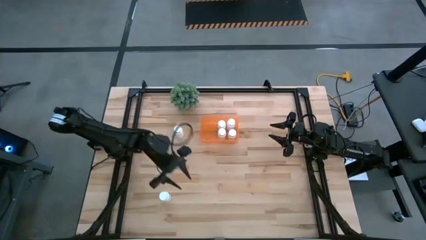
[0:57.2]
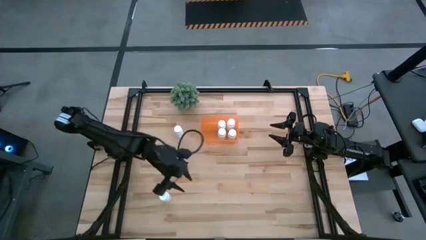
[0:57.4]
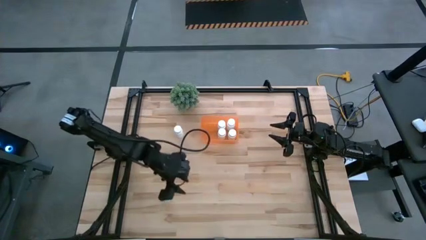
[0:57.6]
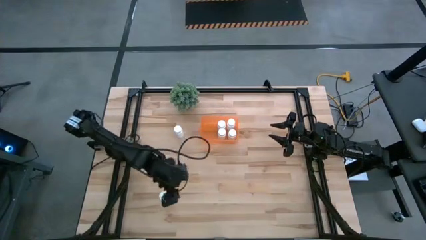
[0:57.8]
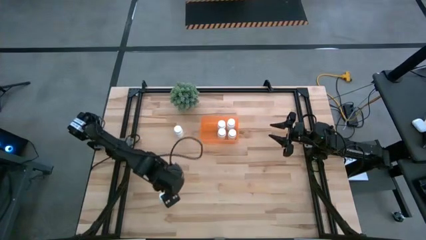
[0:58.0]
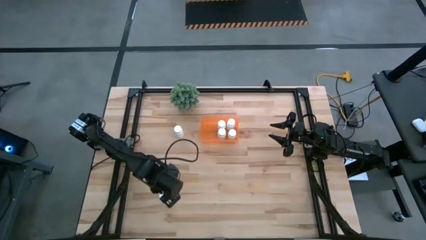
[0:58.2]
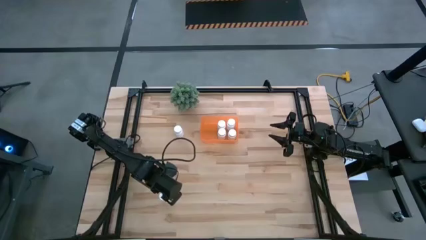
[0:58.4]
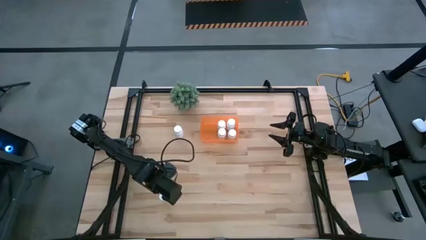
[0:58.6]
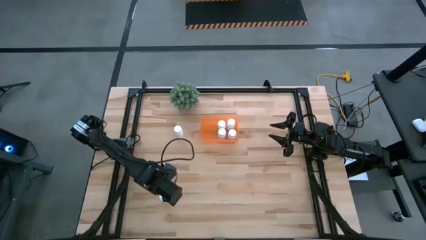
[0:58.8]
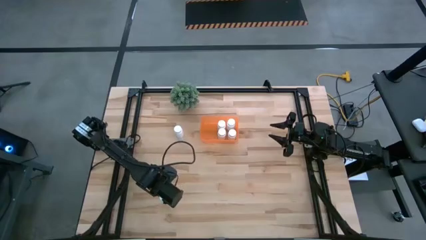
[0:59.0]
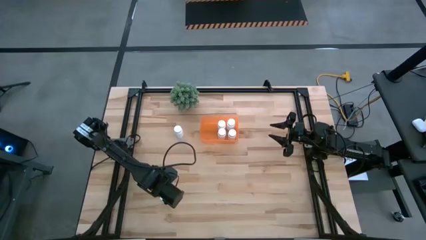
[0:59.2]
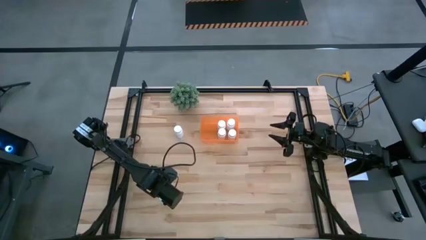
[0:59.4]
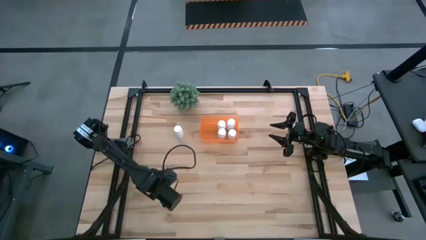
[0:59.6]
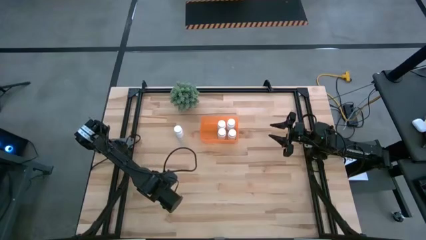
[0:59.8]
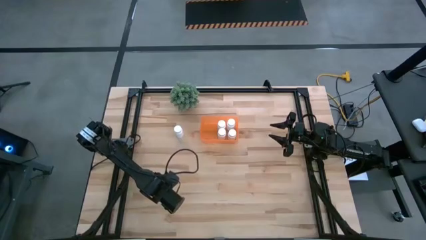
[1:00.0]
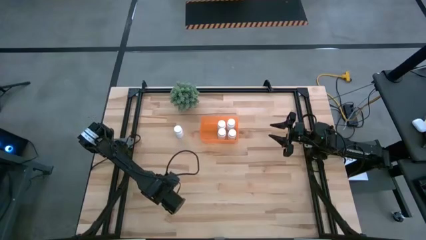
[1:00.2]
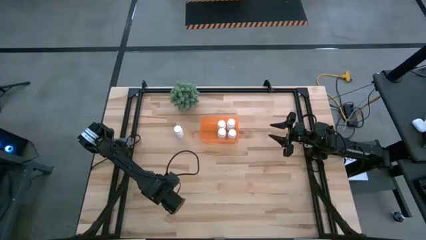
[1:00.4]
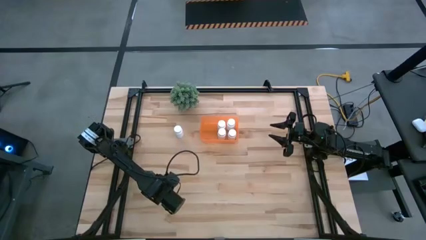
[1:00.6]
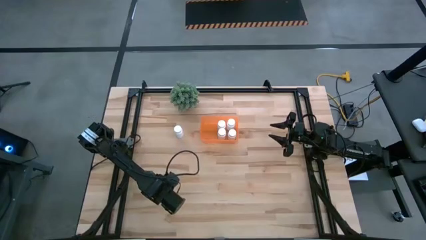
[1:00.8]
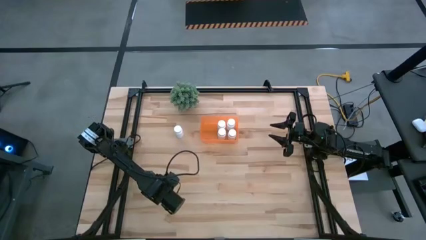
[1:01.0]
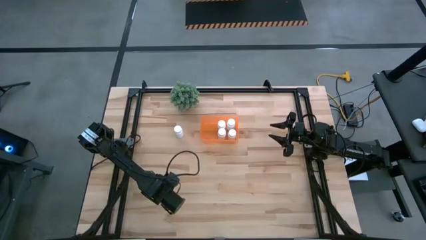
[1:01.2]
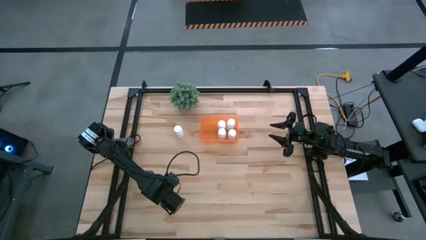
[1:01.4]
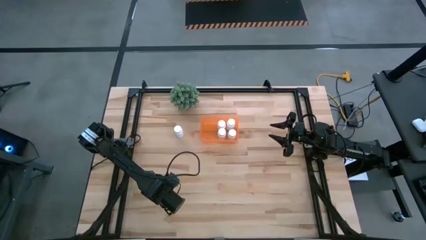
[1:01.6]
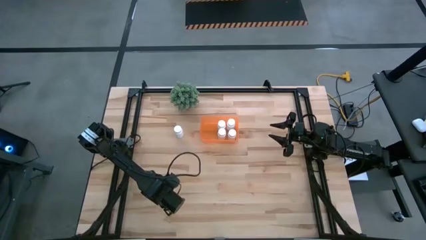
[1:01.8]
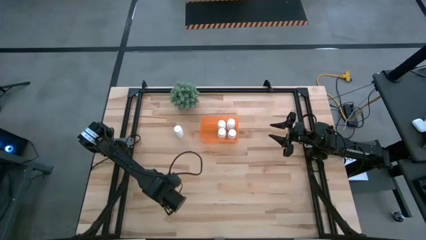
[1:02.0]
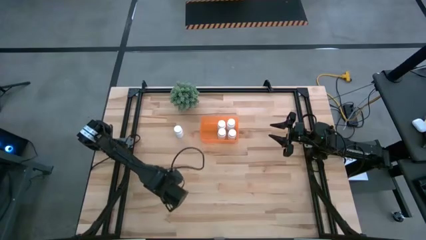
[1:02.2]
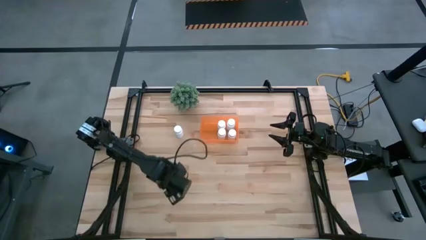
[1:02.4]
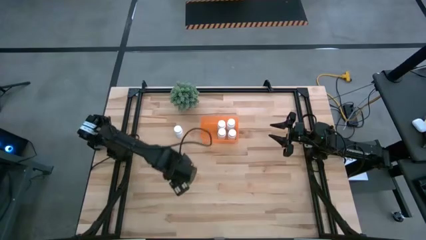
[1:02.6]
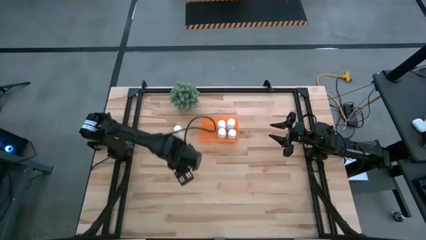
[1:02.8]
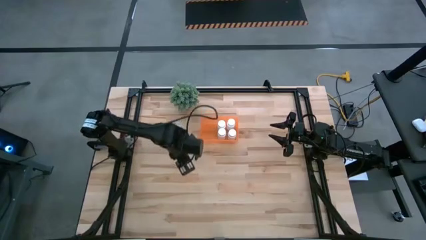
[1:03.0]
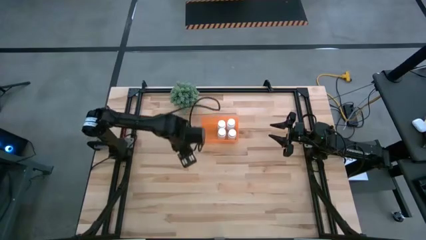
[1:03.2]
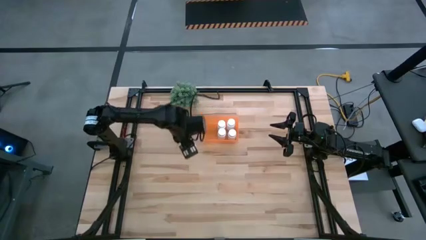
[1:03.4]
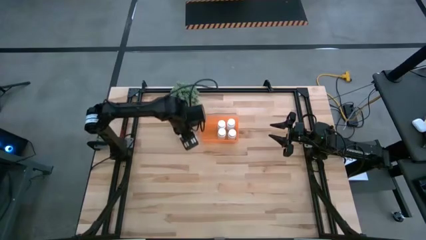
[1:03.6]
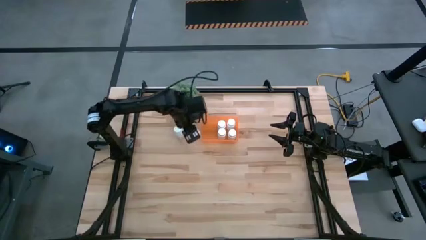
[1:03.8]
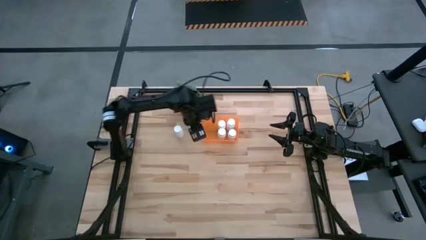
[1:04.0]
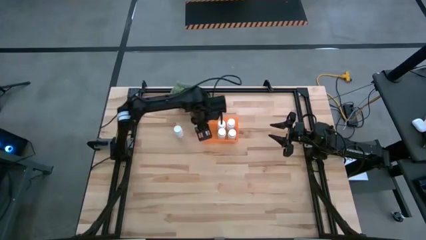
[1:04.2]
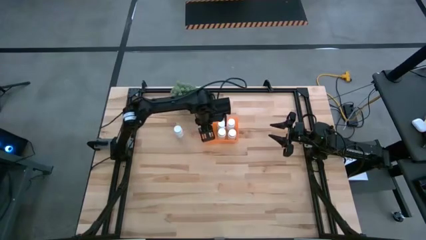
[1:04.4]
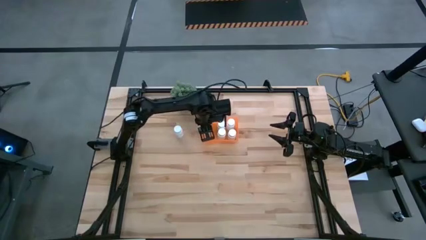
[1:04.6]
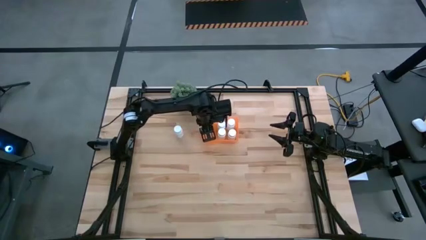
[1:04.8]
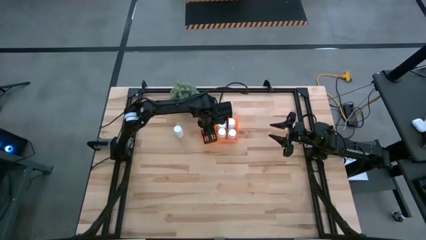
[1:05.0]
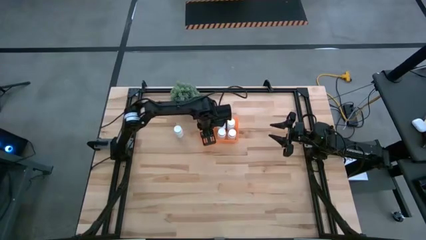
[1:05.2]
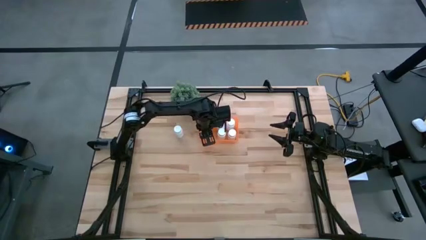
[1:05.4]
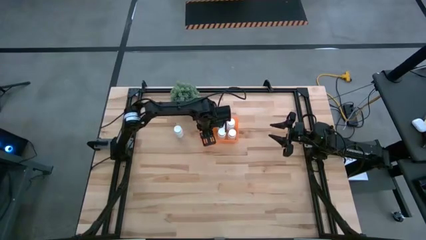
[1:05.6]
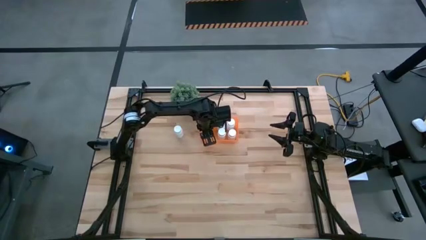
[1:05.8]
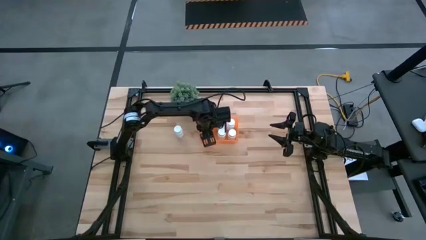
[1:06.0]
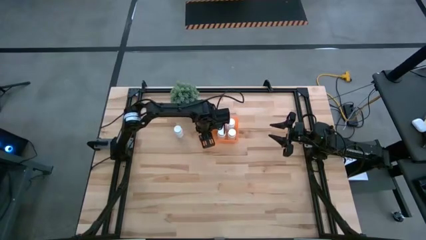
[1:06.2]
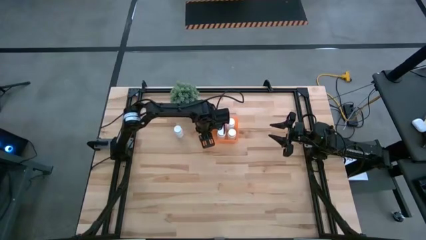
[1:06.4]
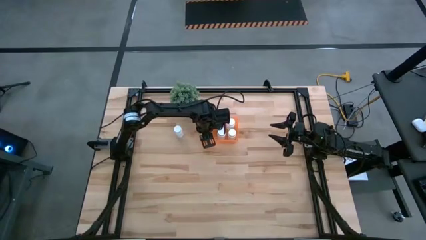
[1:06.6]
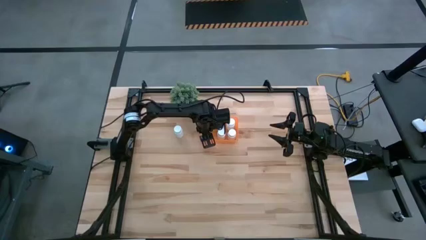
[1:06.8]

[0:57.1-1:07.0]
Task: Pick and place pill bottles into a basket
Put the white pill bottle into the orange bin

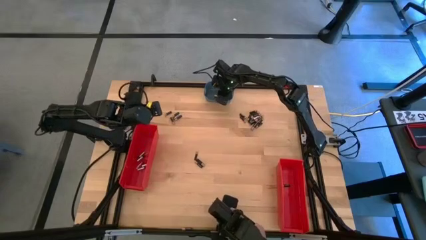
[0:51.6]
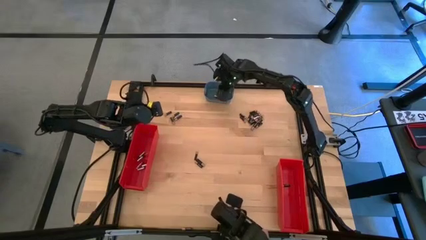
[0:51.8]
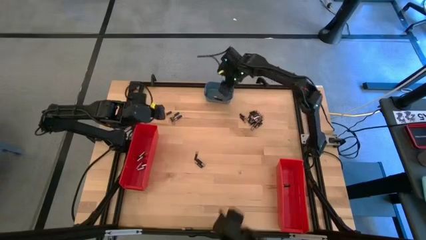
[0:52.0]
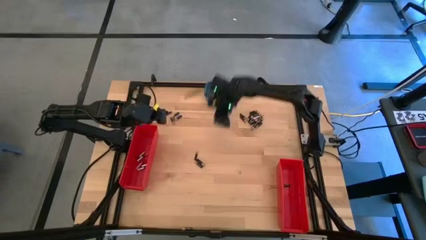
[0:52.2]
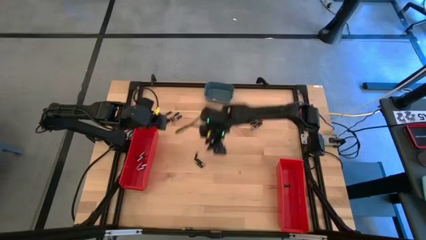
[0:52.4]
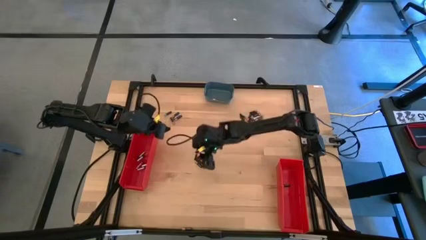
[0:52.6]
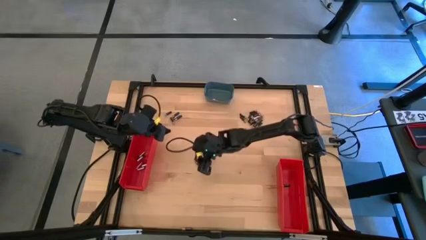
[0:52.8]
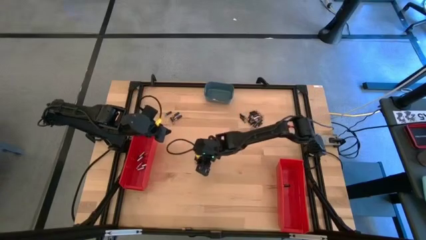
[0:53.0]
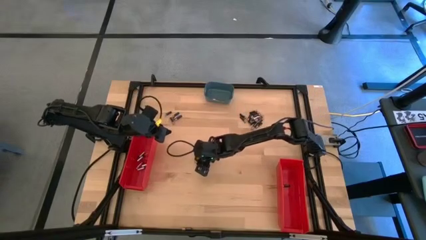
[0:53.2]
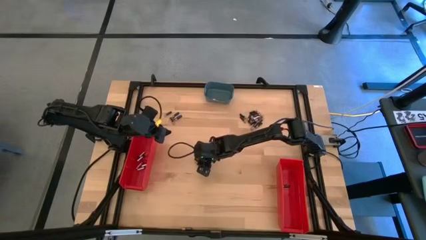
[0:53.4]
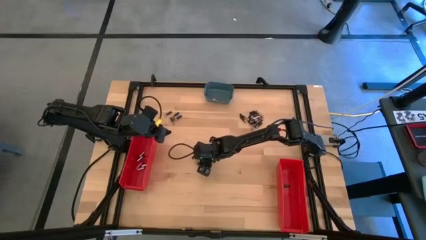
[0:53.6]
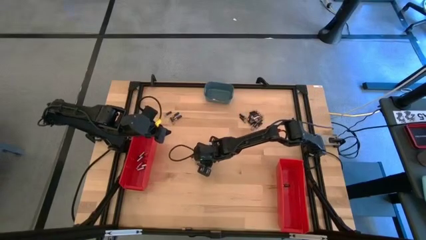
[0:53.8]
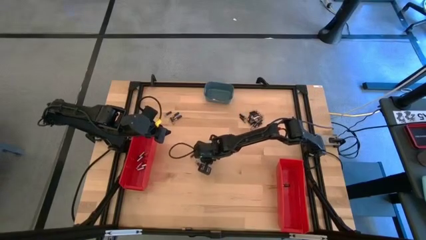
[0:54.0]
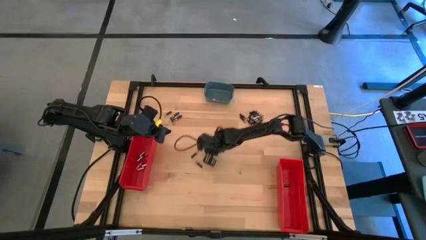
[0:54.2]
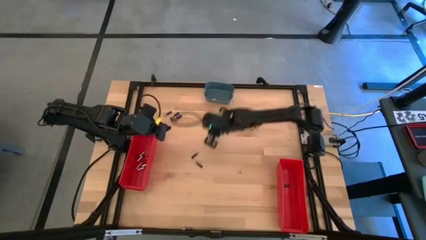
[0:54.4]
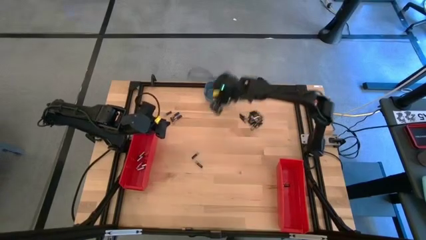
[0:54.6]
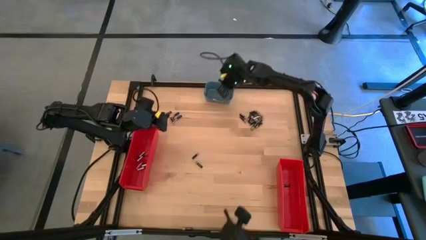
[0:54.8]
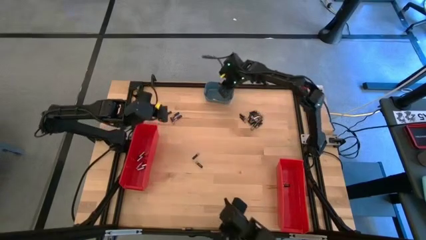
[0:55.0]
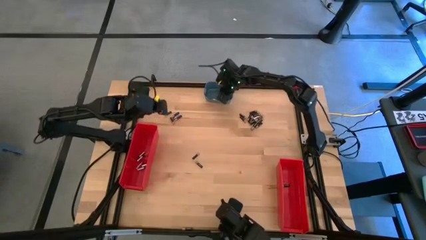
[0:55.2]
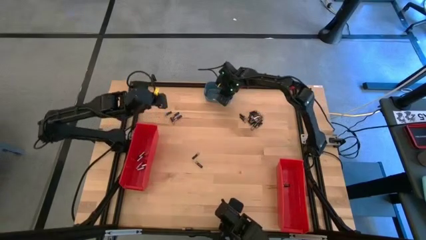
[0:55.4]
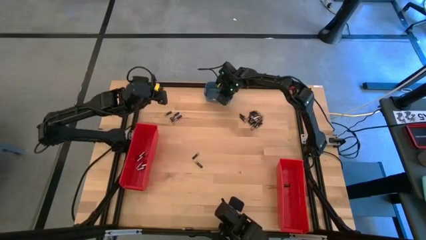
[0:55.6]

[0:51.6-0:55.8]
Task: Sort batteries
Put the big brown battery into the blue bin

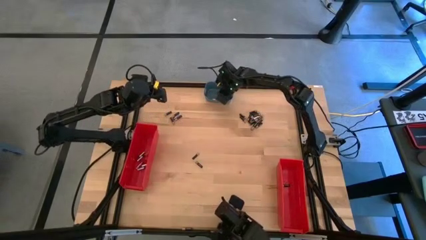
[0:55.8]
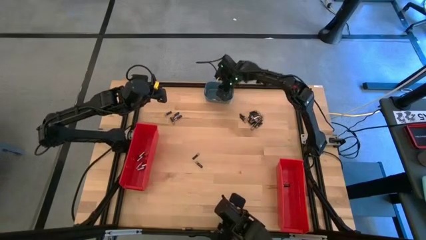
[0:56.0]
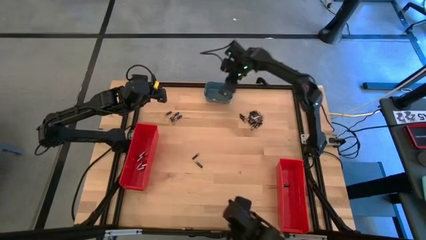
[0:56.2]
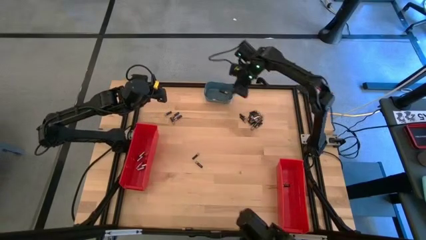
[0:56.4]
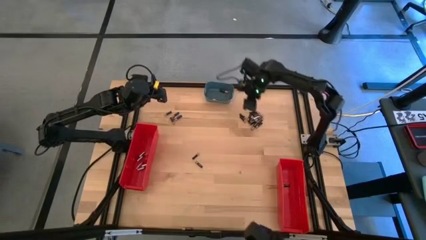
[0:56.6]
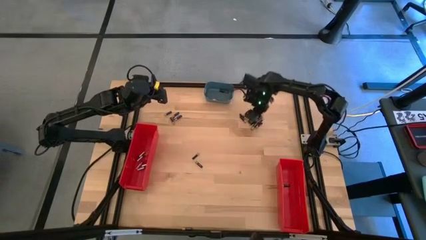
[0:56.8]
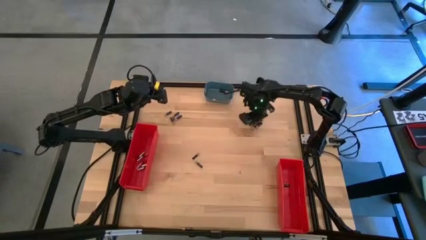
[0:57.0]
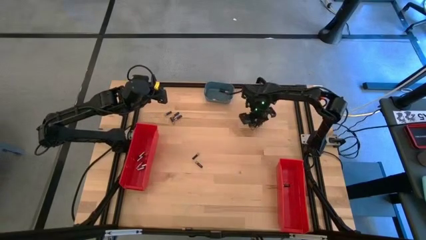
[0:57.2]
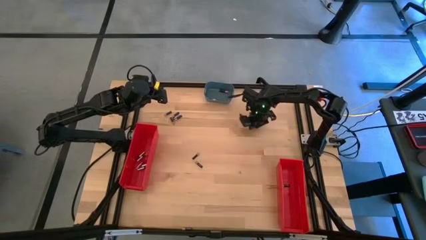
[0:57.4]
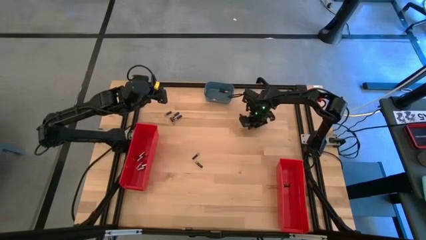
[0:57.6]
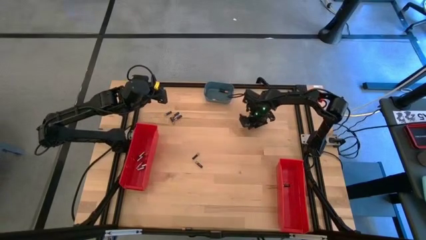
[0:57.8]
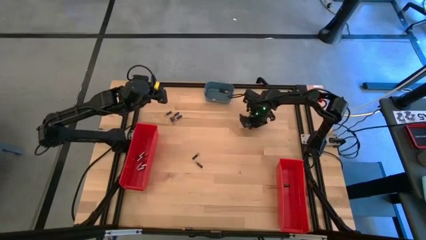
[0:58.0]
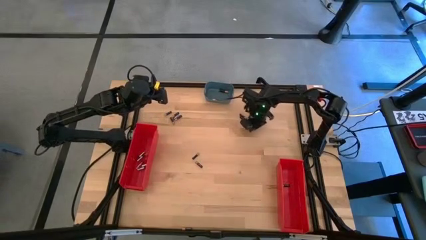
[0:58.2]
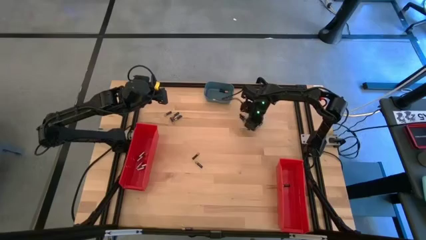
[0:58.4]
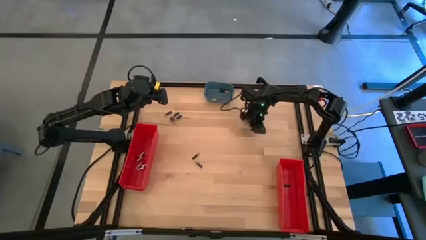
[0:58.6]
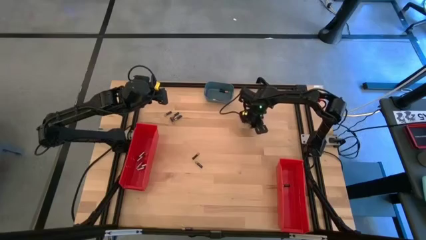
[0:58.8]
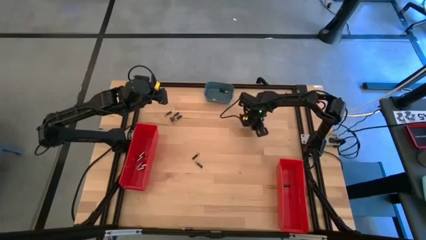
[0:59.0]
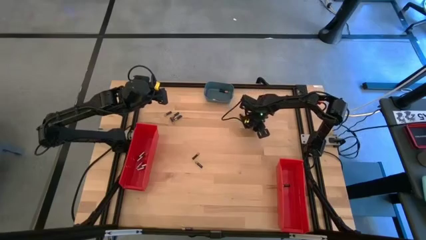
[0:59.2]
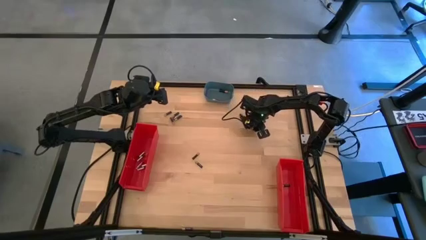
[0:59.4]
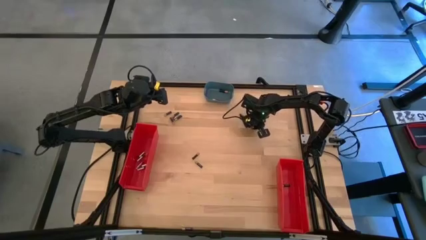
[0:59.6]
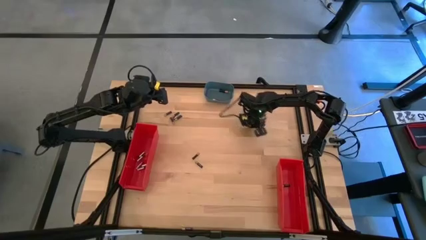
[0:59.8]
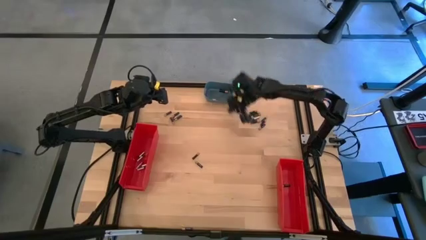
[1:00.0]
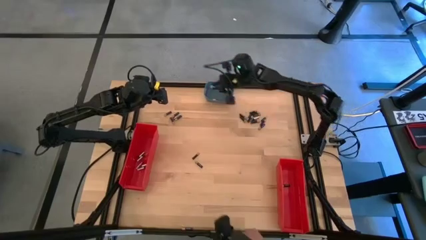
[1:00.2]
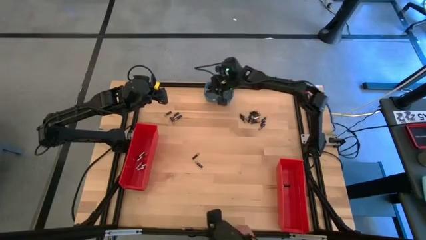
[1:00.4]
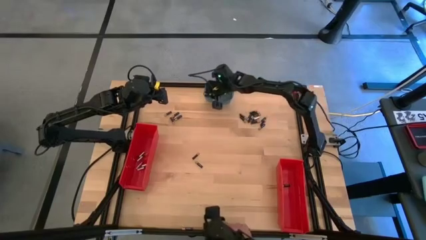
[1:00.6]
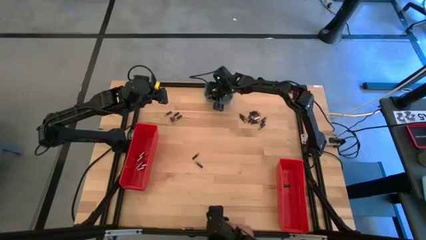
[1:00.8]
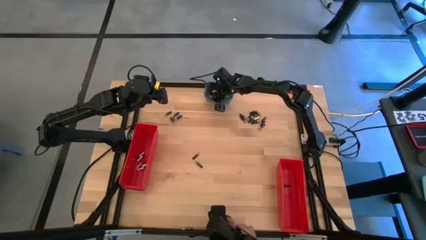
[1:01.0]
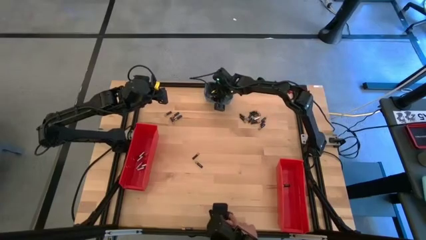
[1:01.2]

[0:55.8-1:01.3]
Put the big brown battery into the blue bin
